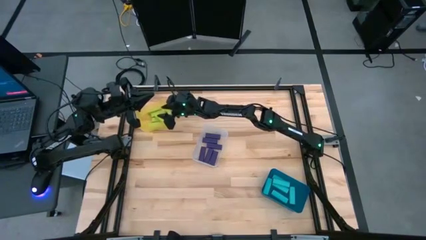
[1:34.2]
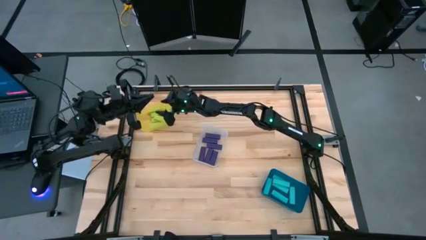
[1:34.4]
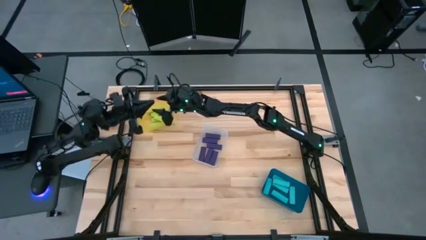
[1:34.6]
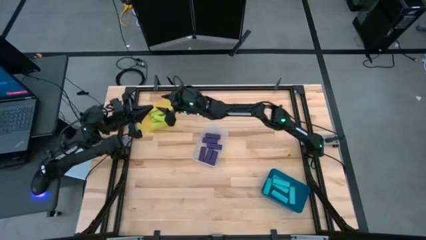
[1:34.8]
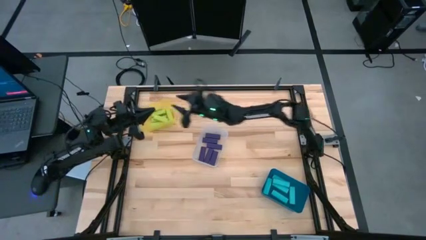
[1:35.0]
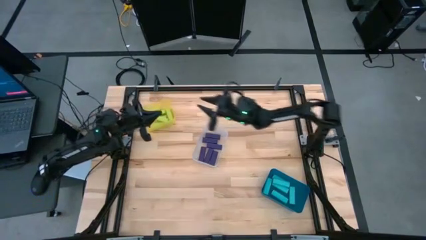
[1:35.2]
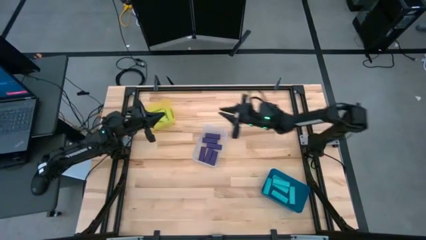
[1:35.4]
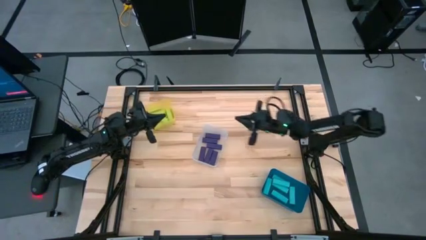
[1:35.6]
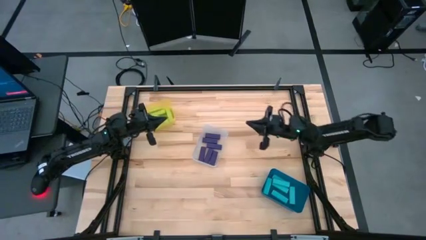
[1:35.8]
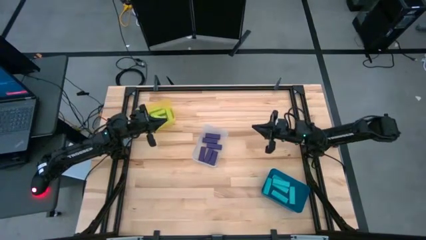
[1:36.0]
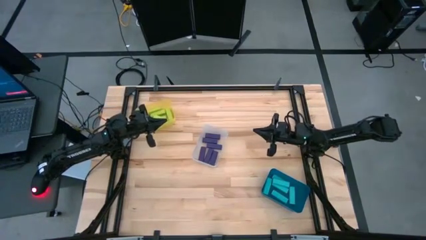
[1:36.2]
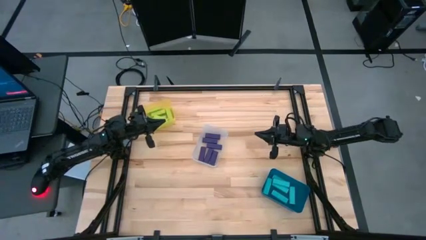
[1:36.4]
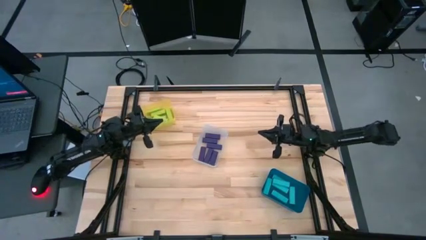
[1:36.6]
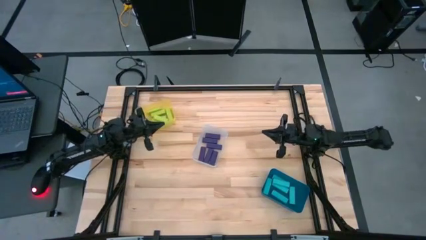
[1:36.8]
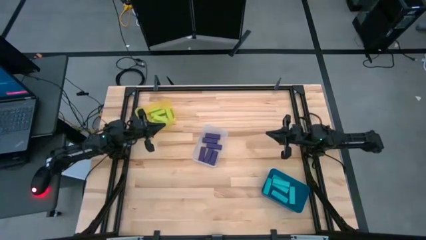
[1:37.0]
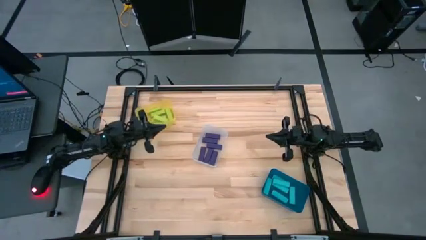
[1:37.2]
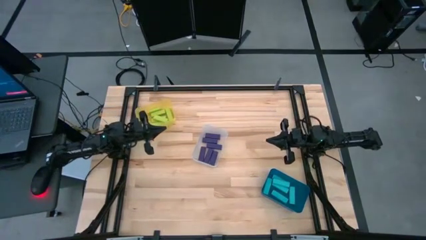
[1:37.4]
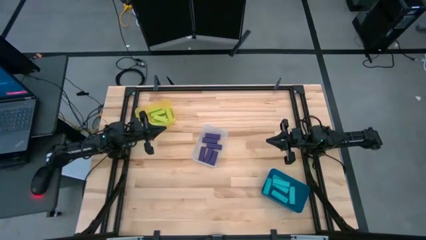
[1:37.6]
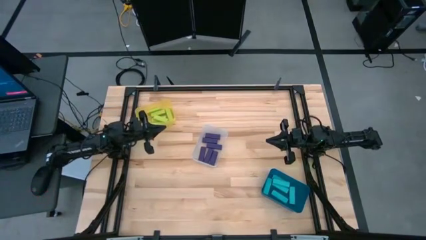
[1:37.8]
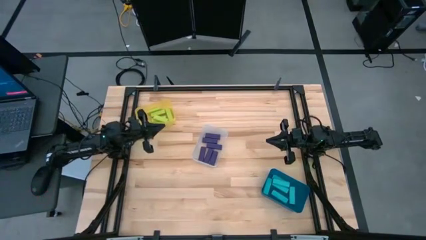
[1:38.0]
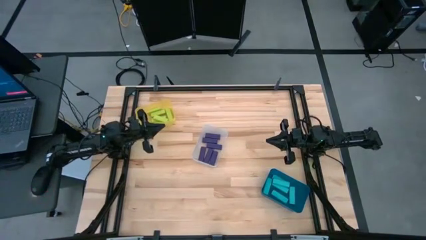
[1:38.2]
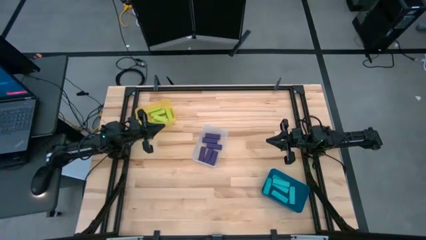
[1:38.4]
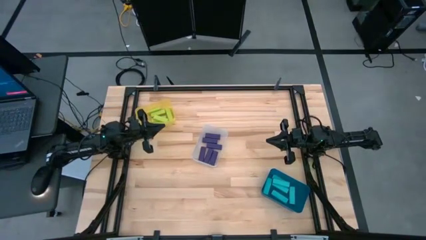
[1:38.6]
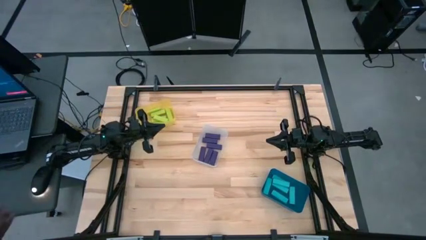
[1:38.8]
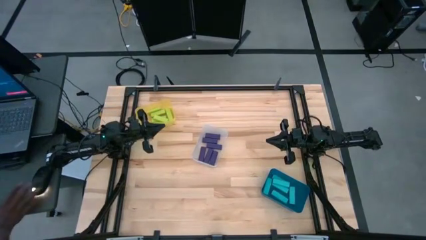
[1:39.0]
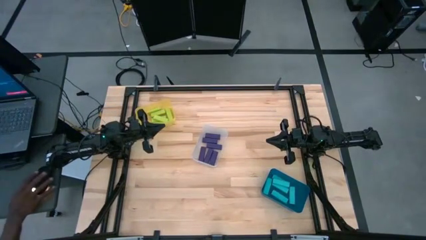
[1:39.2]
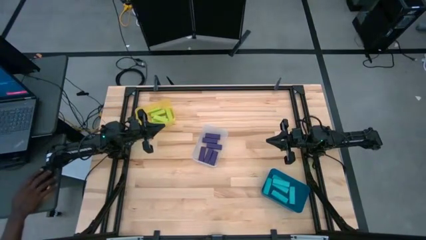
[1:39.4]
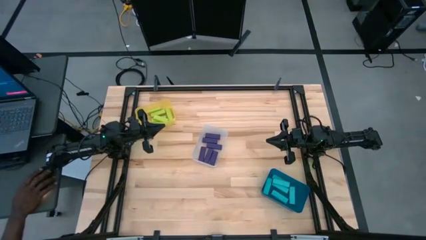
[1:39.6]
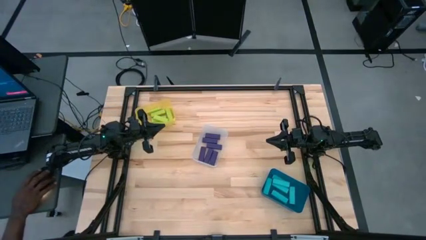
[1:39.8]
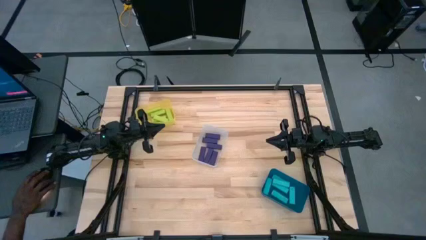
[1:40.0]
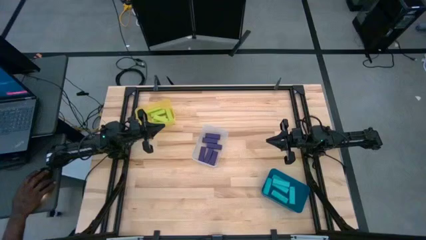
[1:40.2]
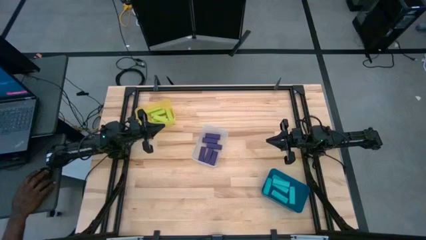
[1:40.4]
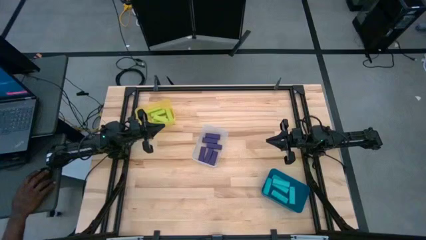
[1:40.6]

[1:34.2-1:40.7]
Task: Sort blocks
Return to Home Position

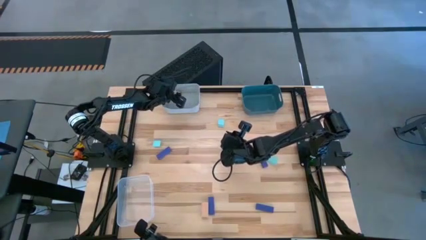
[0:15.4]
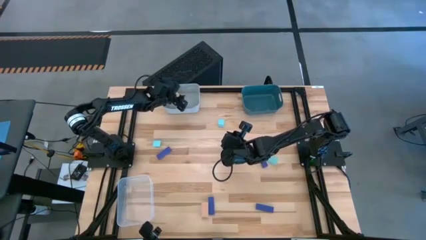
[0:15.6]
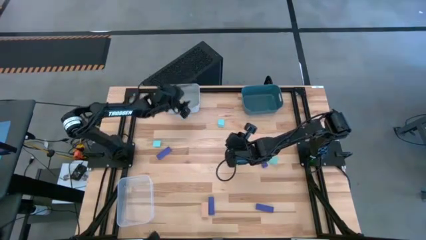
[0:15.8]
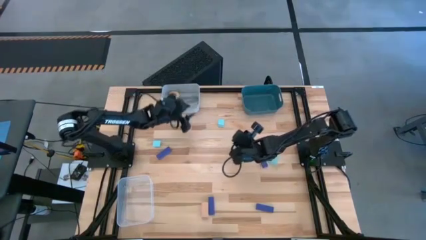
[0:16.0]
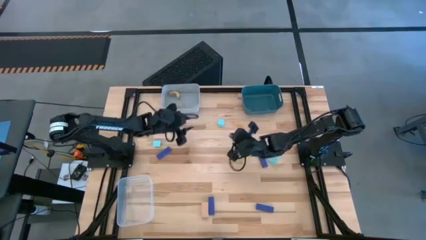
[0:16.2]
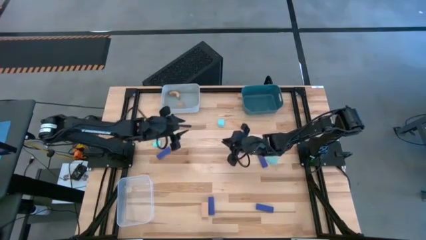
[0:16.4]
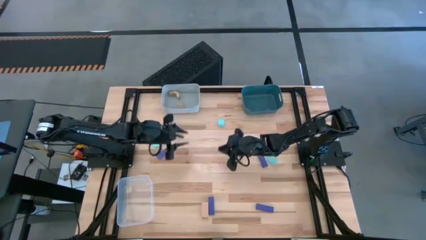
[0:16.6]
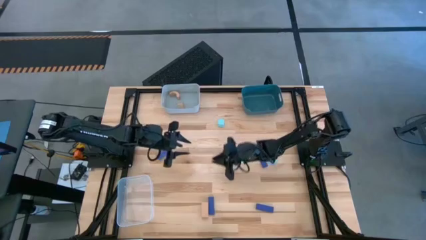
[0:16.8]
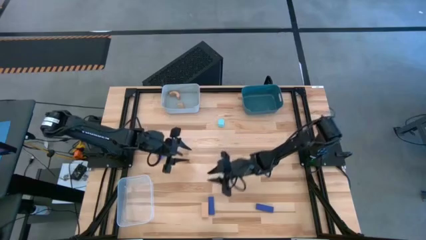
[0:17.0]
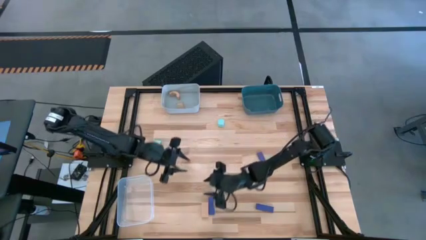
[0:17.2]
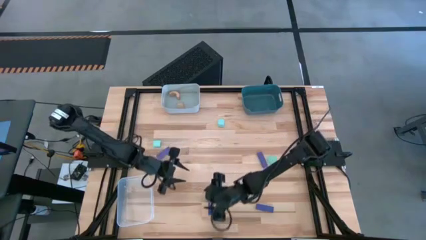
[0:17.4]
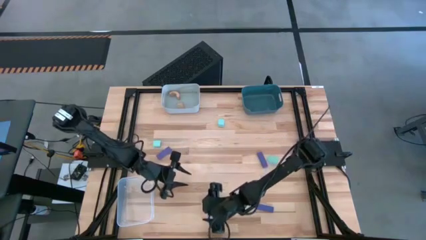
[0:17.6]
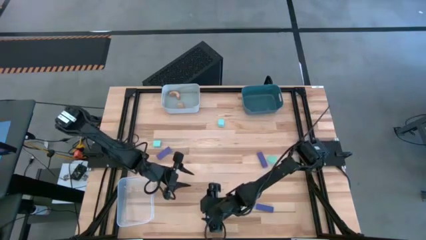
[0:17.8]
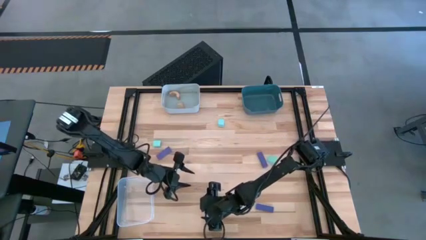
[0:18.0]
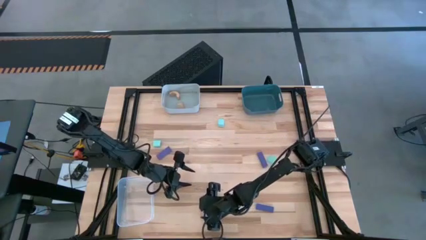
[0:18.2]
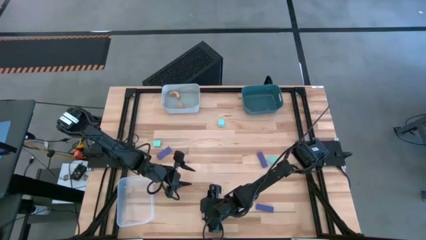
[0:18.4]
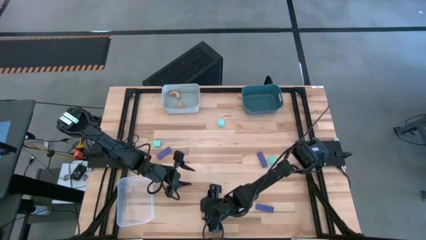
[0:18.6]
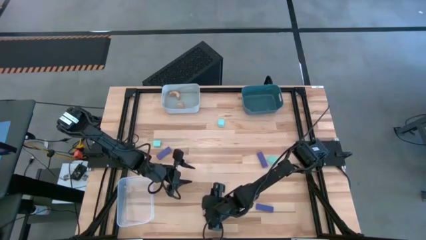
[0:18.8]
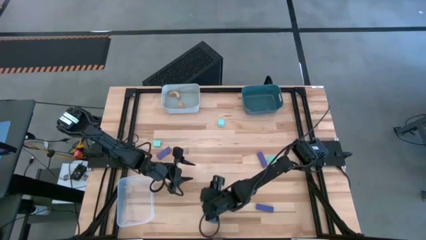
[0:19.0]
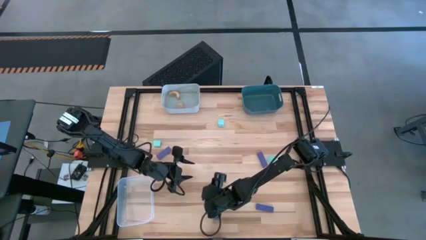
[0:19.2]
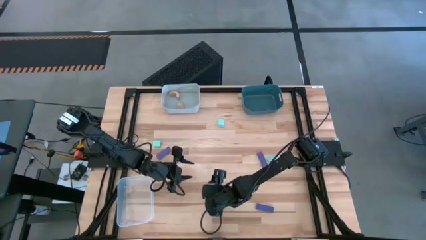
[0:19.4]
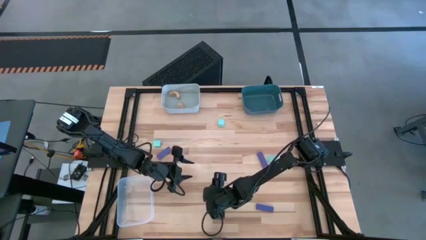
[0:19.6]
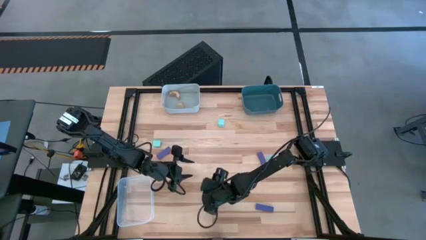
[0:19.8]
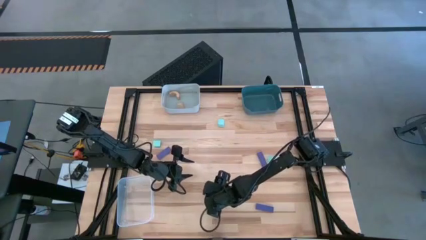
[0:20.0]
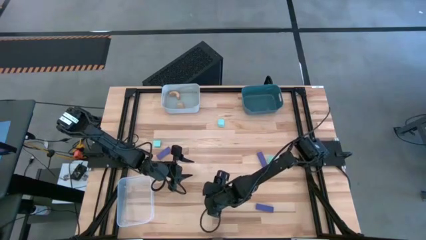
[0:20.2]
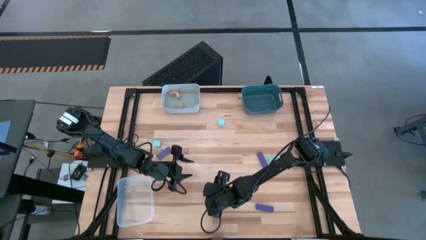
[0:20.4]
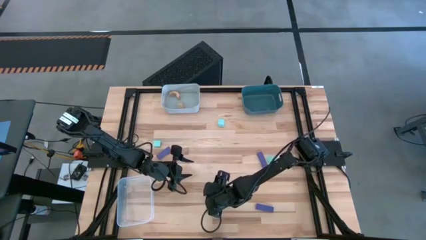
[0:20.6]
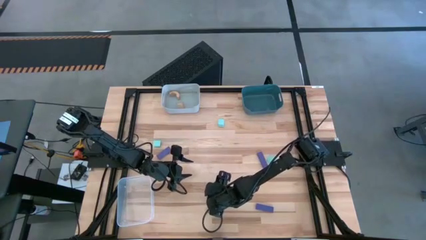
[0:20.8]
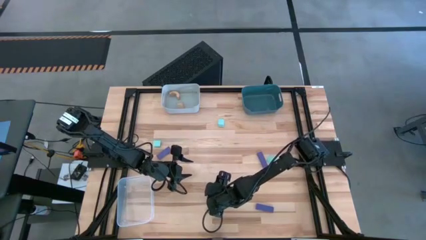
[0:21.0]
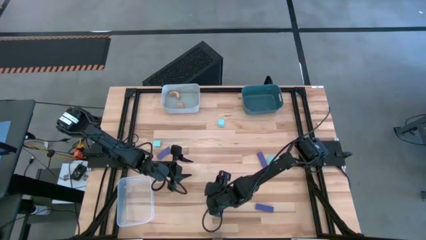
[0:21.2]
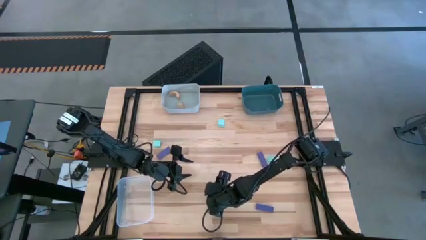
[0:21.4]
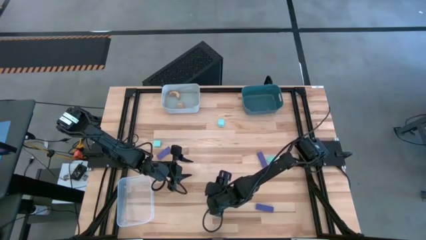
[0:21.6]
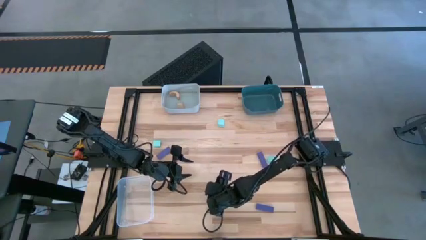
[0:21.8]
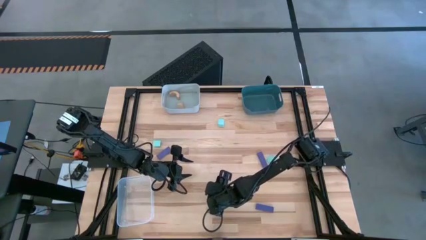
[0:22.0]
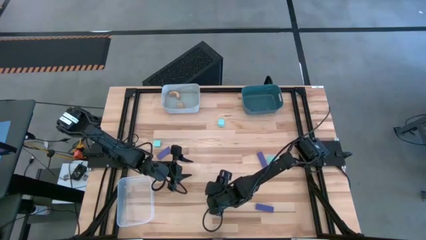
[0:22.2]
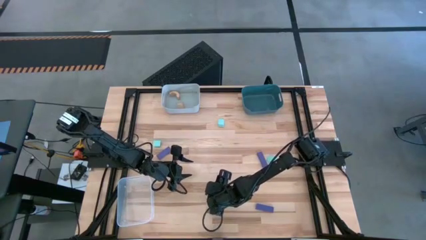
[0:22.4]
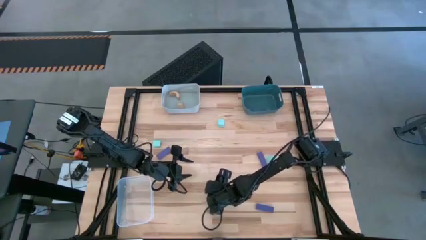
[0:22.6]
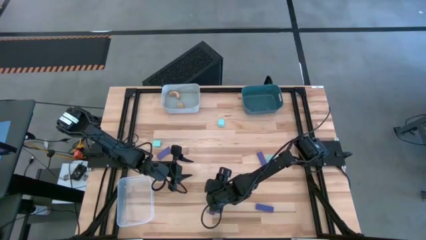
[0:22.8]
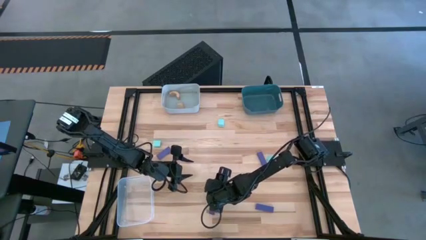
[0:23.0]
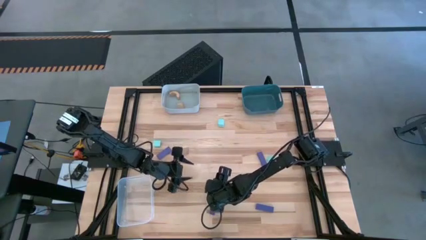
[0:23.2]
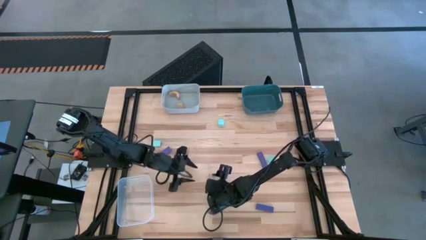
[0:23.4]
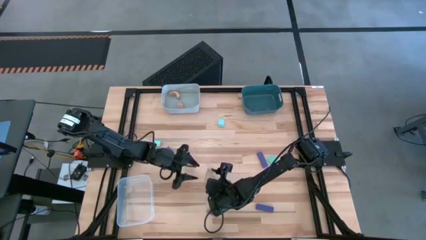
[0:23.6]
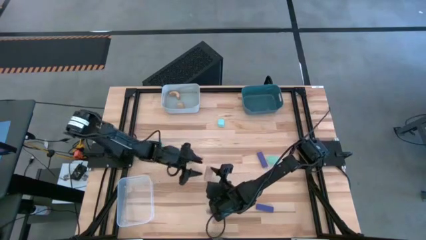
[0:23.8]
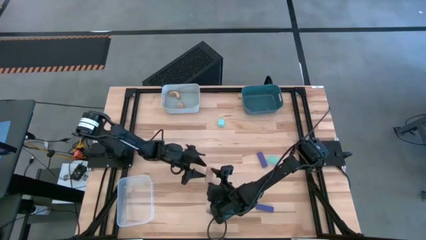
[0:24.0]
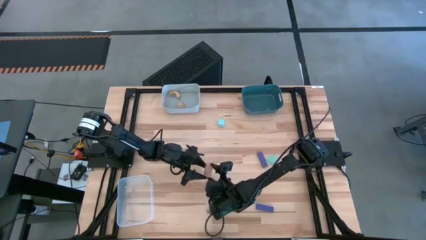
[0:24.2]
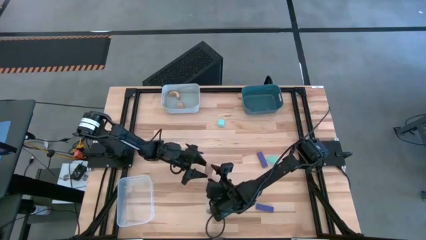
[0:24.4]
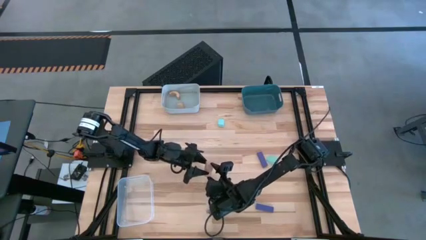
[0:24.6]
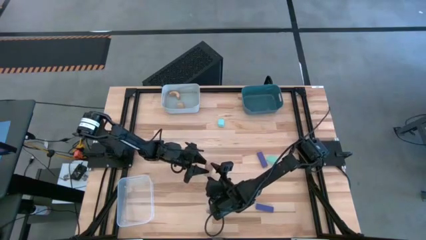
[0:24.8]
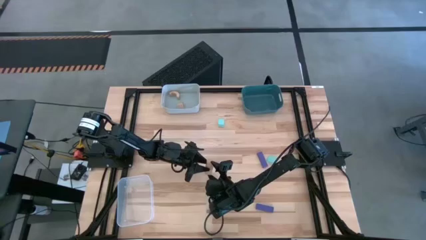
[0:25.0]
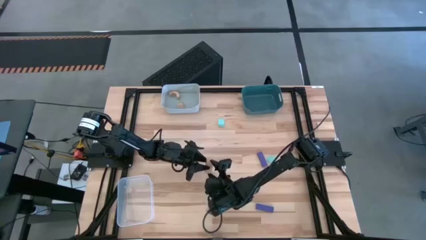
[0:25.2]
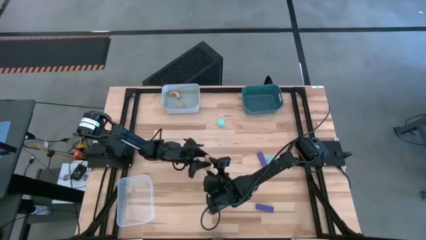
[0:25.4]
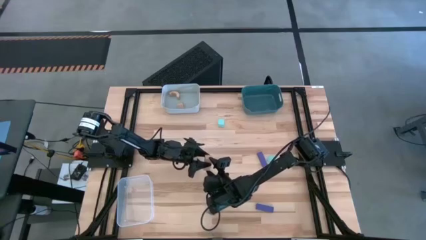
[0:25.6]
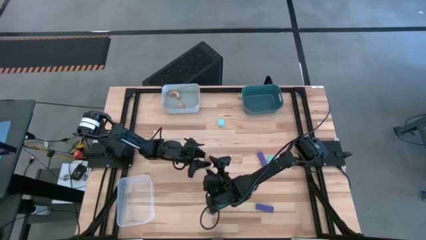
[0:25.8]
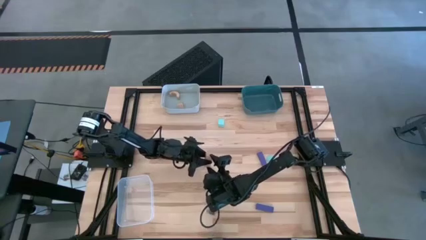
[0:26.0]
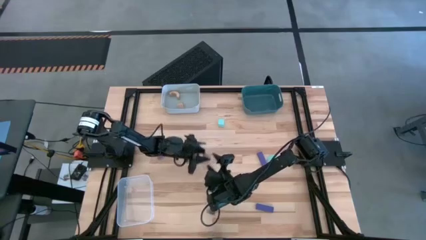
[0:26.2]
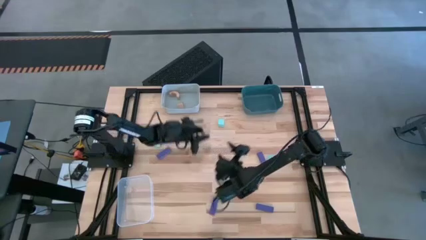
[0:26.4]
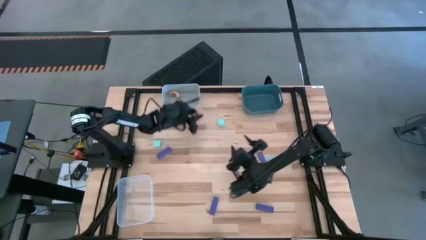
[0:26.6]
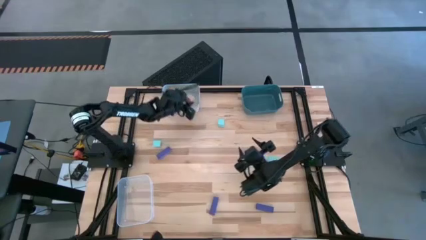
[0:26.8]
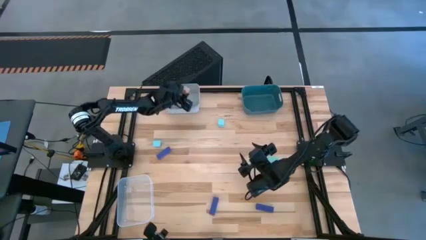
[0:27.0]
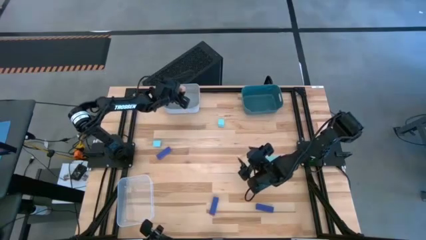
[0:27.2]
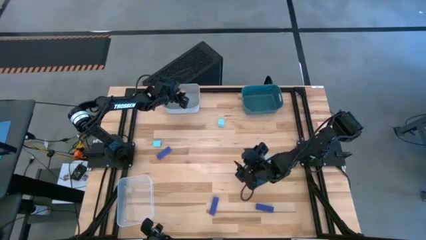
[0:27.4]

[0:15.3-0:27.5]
Task: Sort & place blocks by color
Put the brown block into the gray bin
